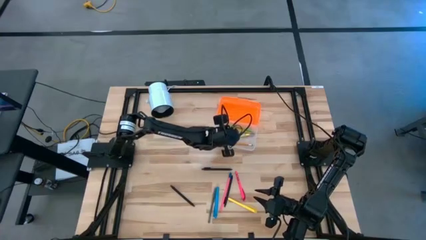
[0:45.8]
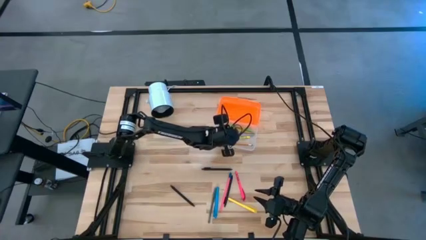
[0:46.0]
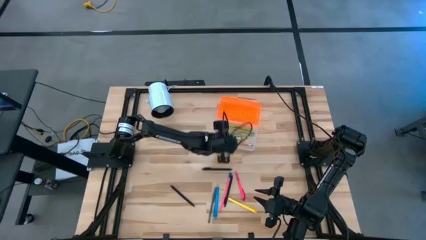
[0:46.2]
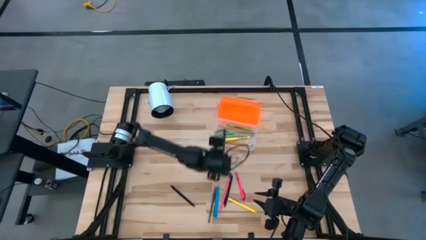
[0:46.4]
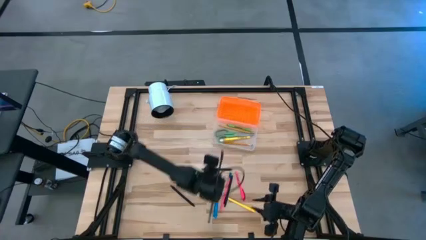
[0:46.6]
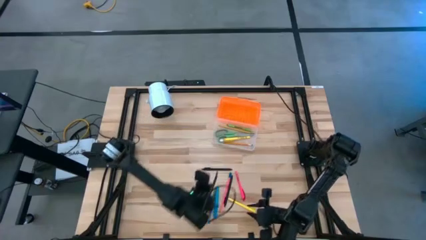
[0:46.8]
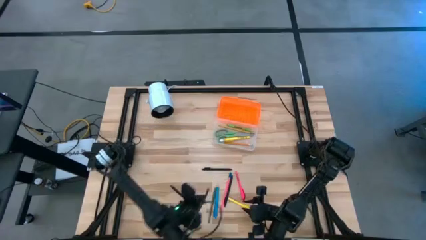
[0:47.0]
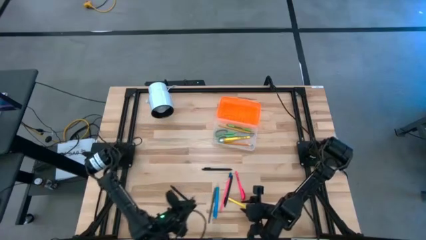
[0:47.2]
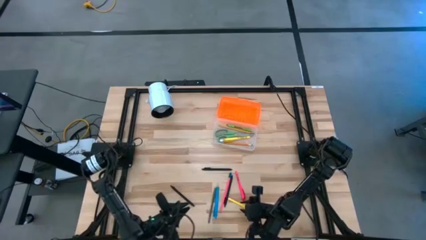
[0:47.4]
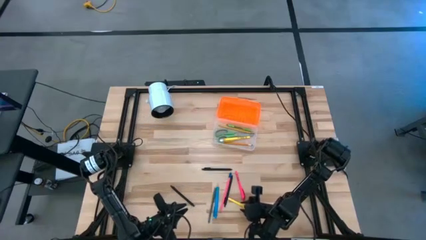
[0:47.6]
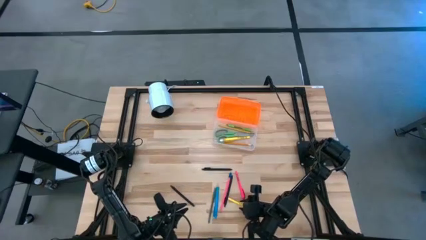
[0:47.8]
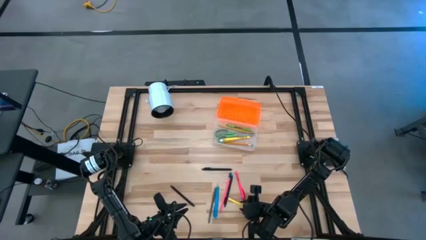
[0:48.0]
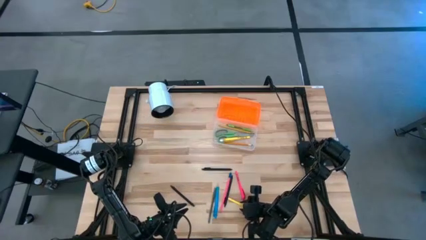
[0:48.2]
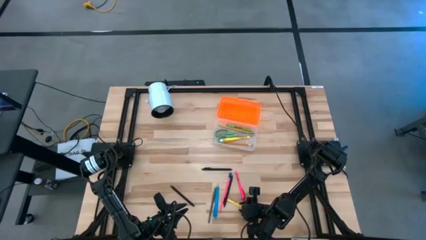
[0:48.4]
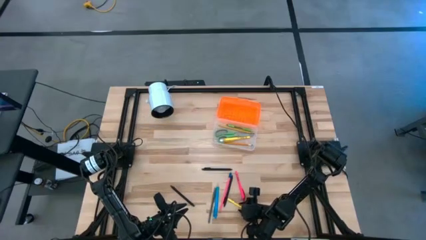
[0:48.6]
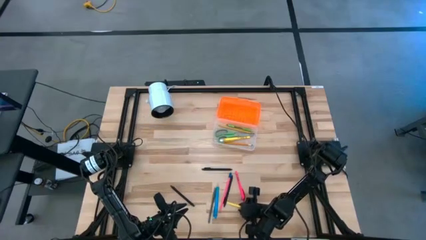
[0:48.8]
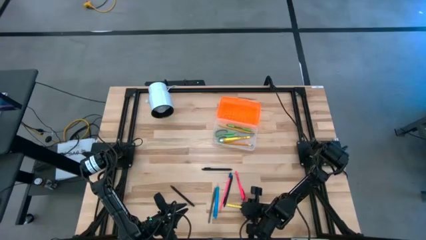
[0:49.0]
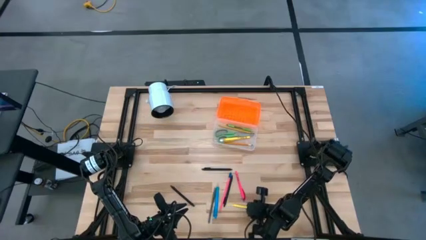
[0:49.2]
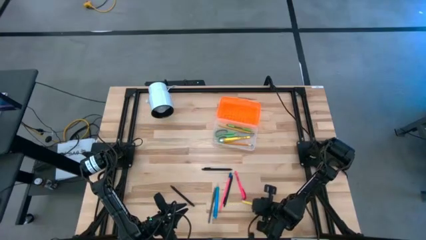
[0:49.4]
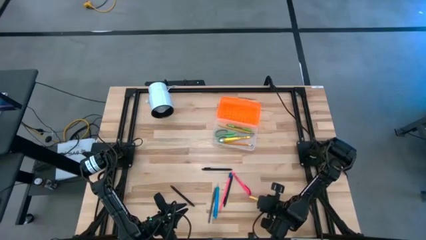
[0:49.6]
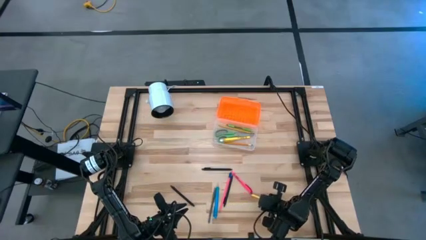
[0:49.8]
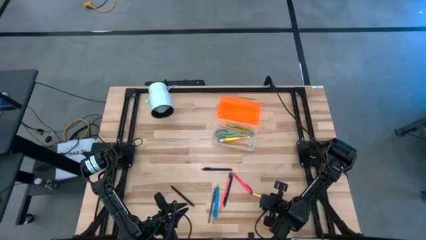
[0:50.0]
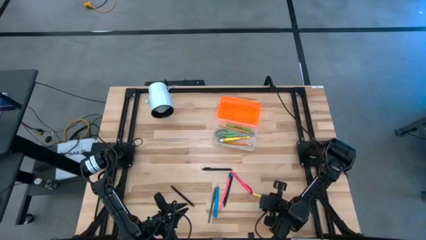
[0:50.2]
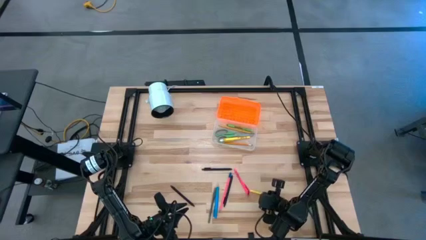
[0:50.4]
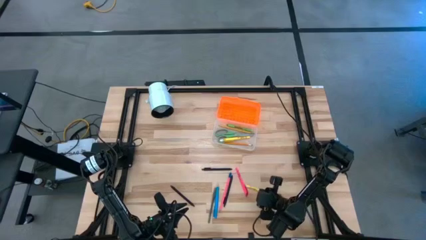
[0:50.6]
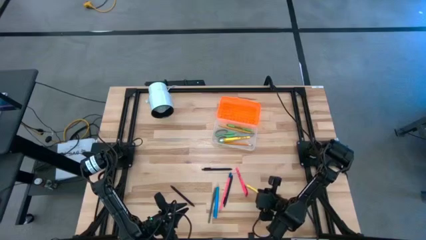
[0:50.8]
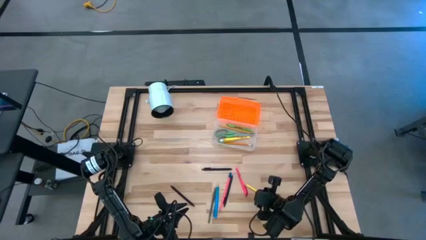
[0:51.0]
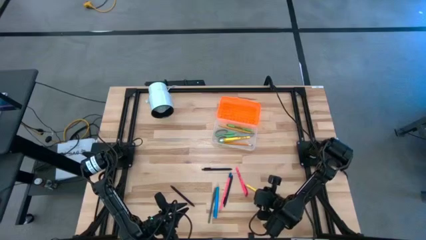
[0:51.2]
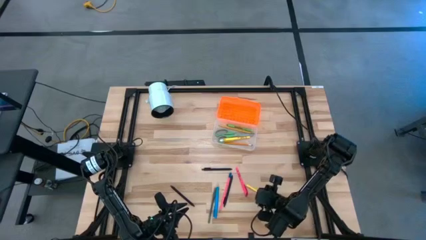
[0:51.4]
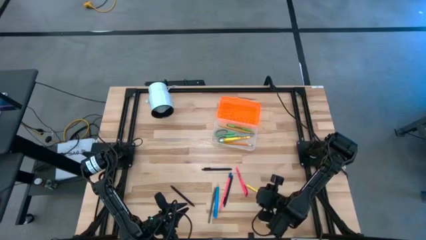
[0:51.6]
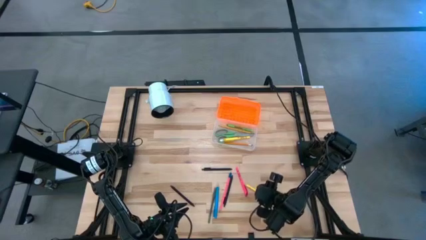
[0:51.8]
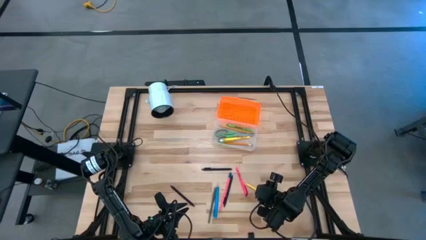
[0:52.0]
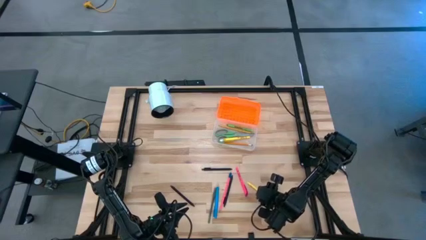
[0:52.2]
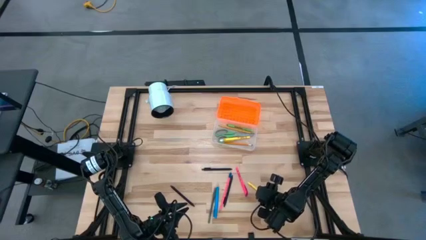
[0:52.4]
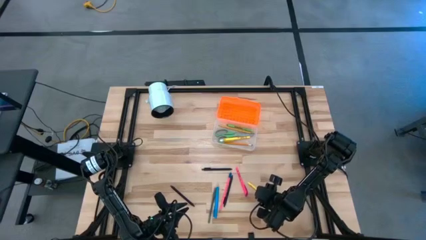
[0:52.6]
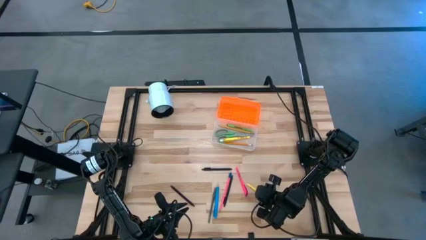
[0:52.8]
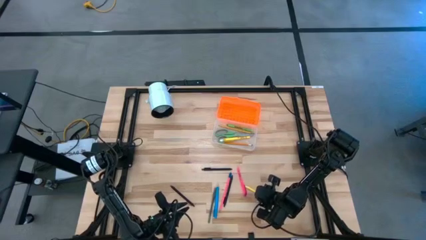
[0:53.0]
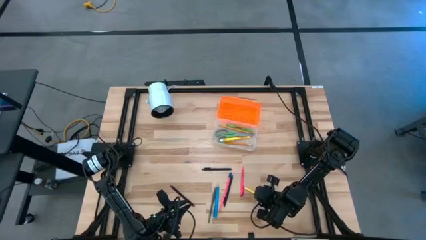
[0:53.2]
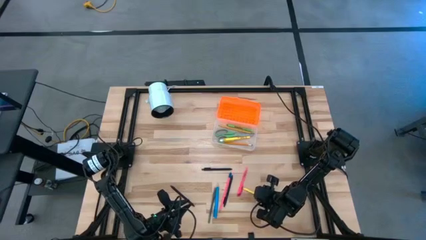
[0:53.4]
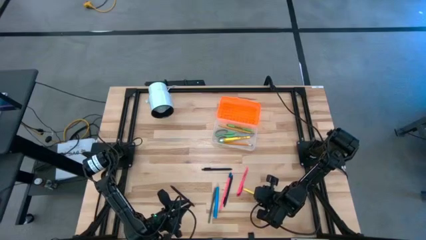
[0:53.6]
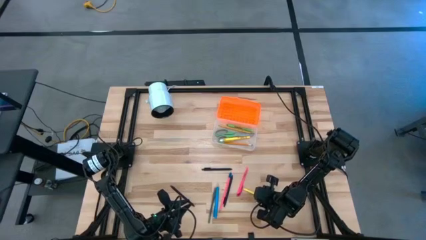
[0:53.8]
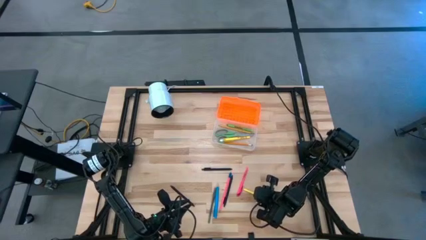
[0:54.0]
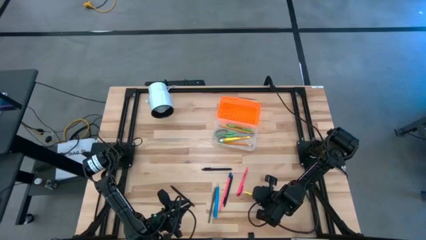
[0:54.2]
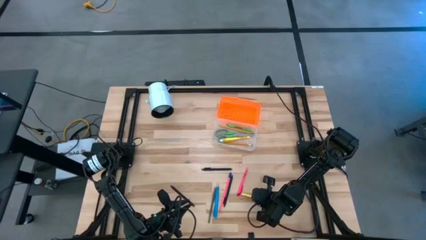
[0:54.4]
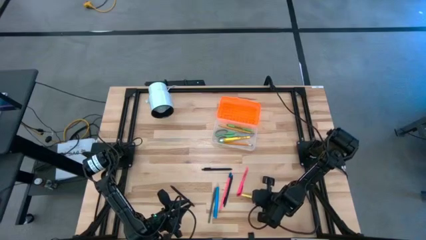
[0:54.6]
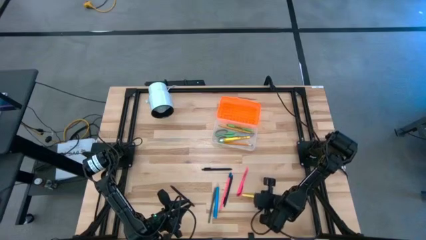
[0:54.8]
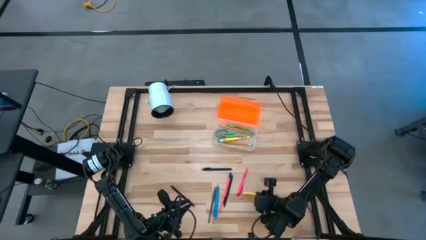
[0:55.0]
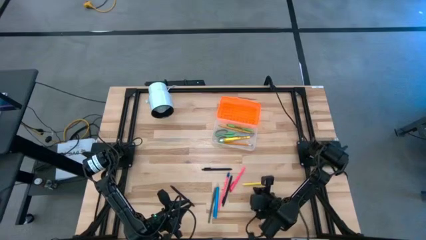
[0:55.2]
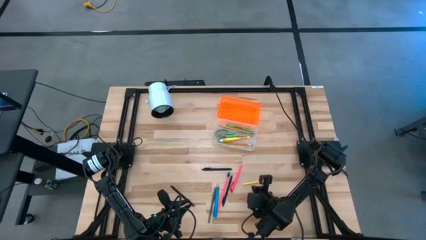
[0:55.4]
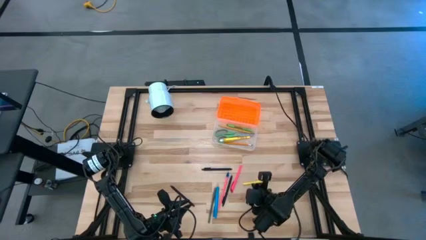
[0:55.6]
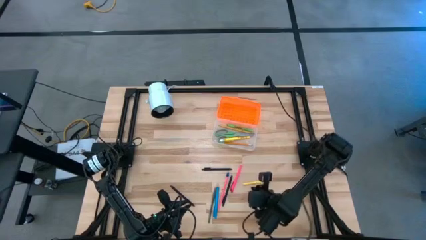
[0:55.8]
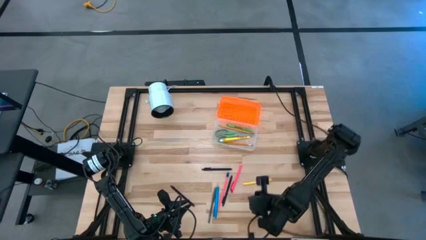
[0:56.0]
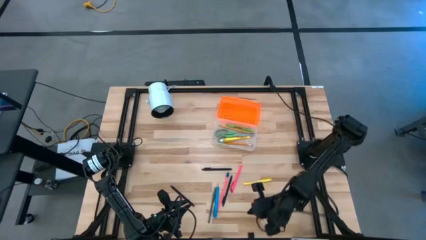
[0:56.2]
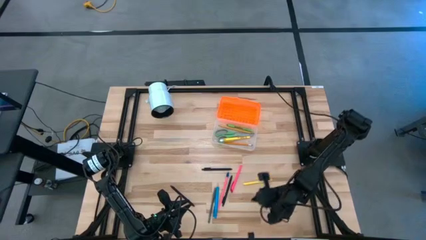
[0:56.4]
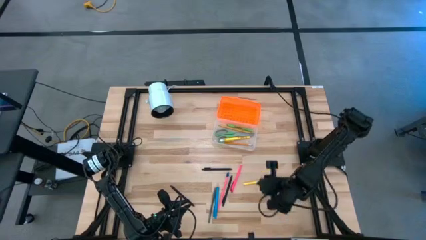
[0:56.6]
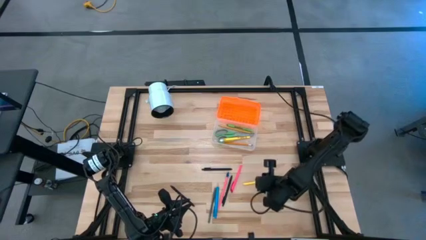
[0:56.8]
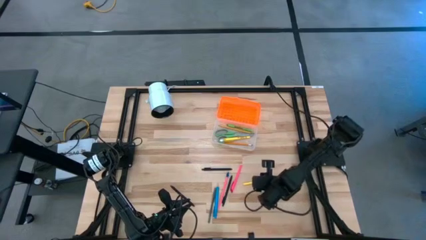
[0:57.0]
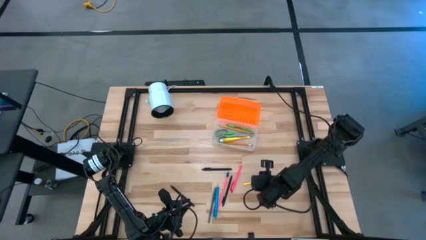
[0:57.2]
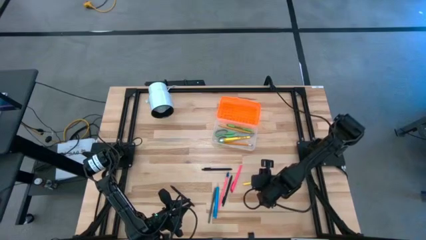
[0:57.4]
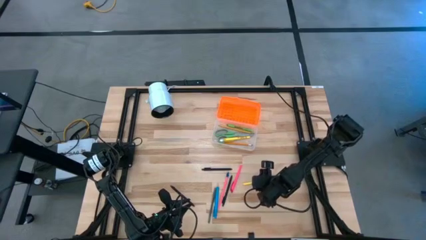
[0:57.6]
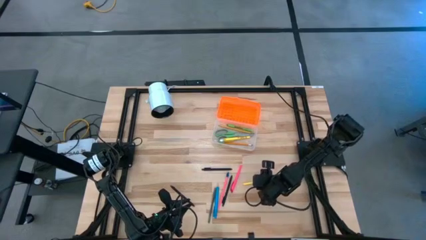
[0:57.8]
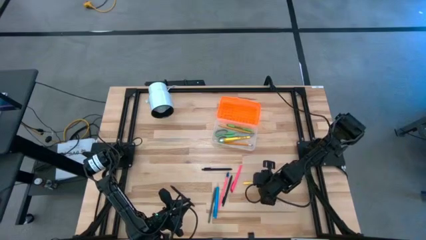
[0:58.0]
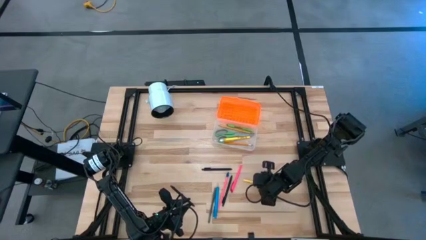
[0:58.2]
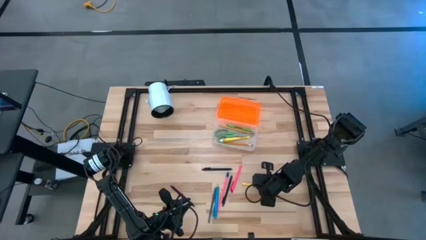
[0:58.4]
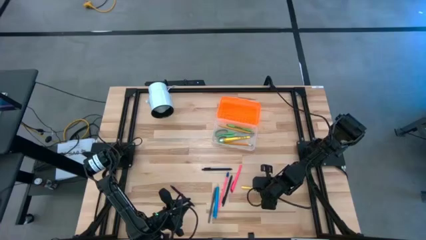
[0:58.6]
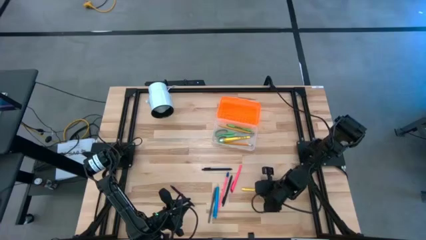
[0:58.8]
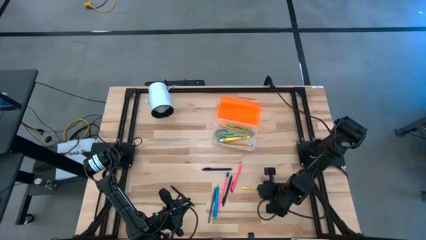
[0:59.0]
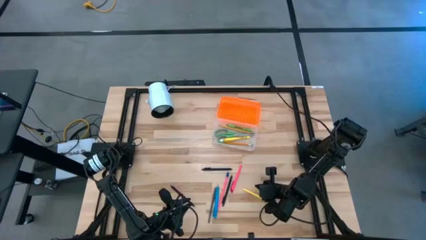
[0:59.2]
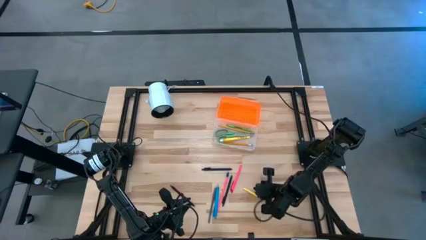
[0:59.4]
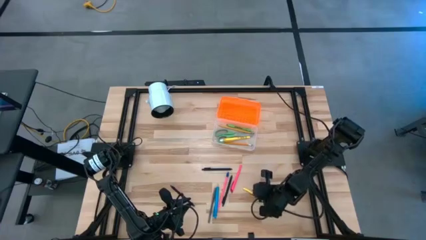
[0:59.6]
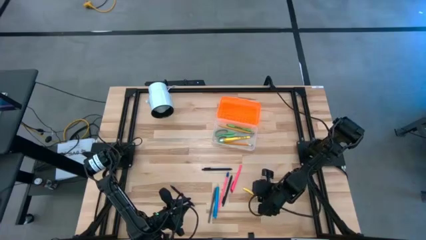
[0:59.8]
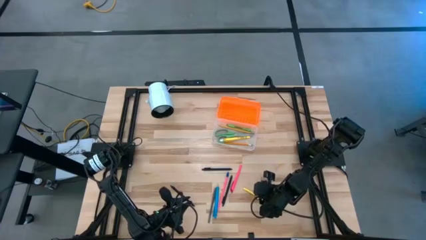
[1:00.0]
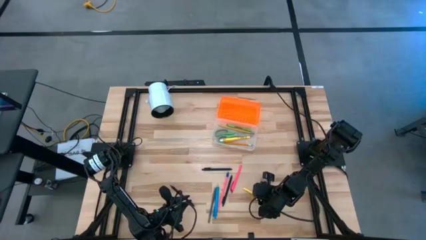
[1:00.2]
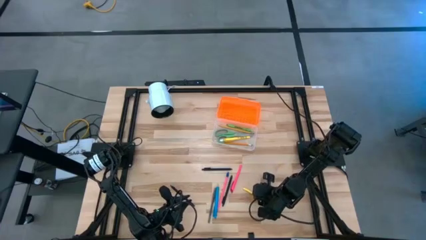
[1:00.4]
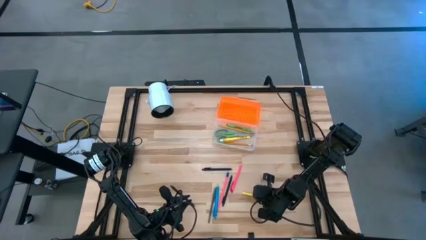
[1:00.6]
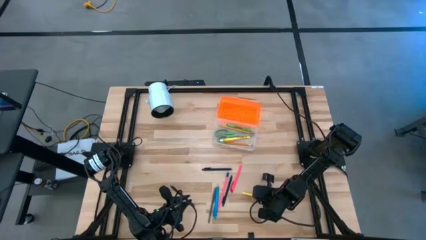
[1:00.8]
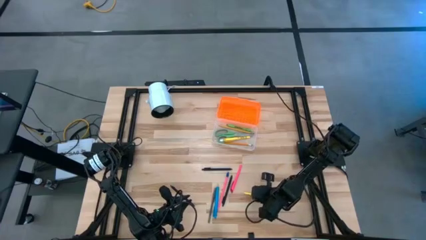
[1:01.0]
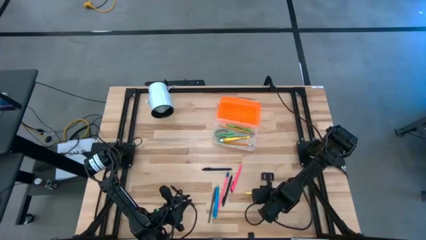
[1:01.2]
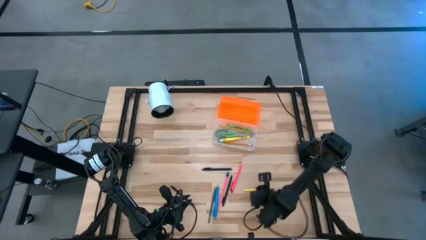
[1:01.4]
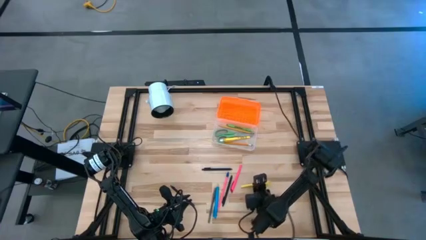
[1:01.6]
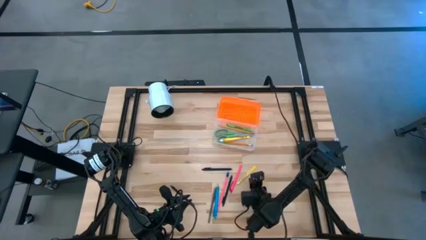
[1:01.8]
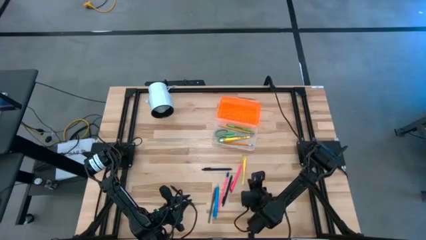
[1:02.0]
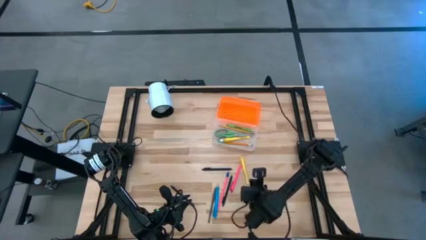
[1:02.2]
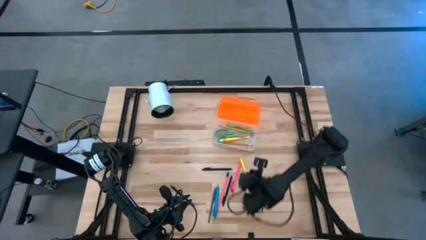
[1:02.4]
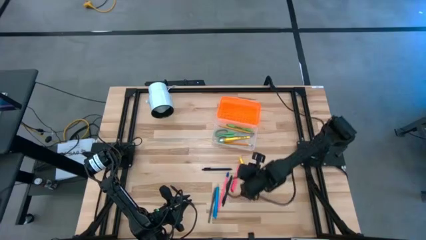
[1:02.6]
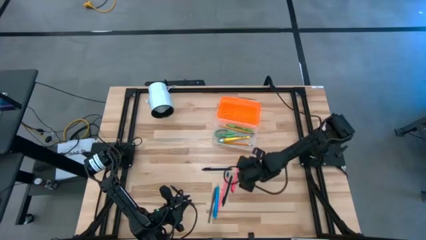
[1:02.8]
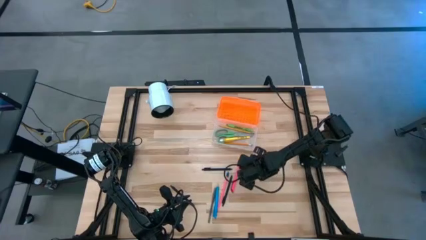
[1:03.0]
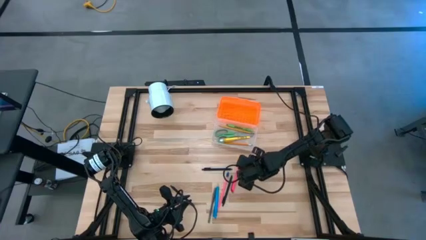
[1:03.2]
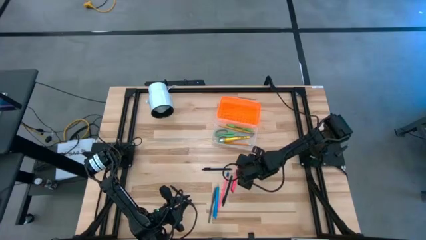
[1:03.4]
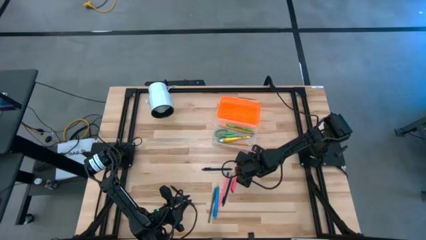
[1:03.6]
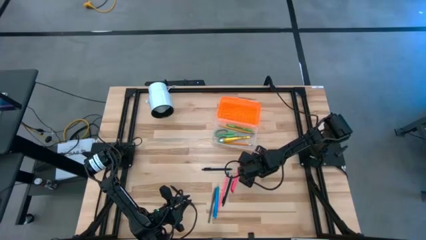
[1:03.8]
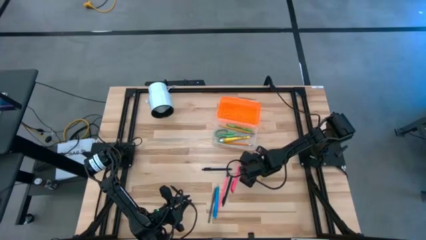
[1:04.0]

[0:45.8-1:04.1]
Task: Pick & place school supplies into a supply box
Put the yellow pen into the supply box
